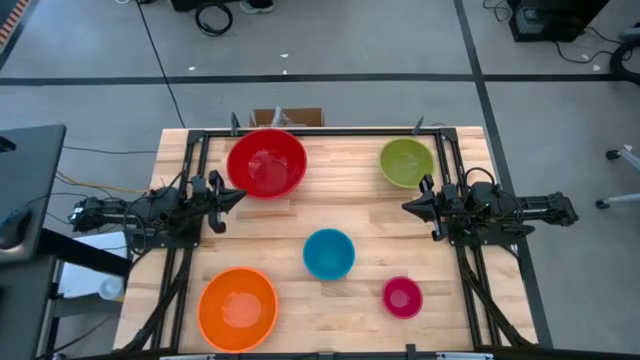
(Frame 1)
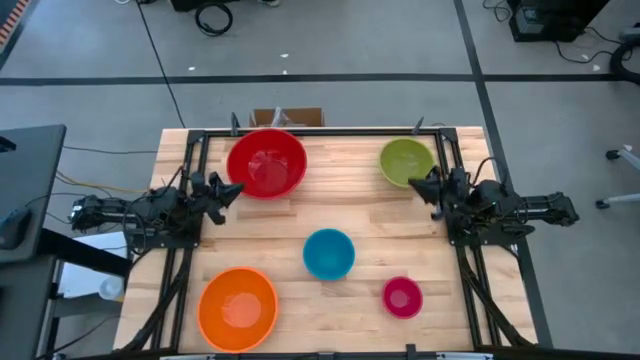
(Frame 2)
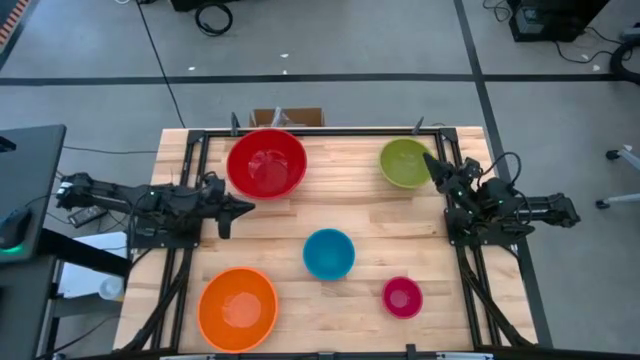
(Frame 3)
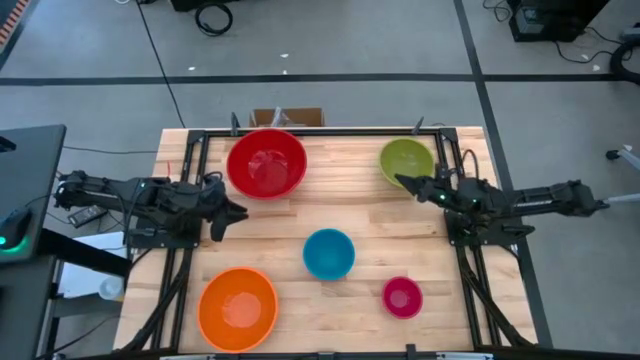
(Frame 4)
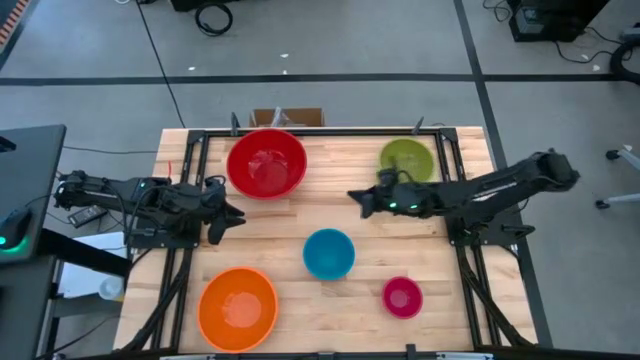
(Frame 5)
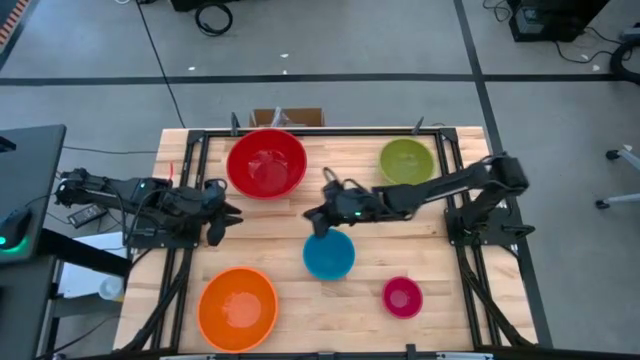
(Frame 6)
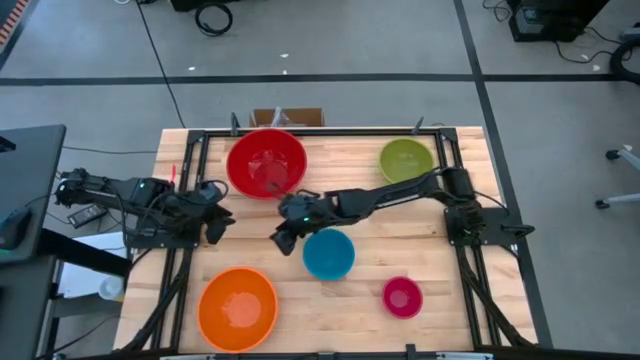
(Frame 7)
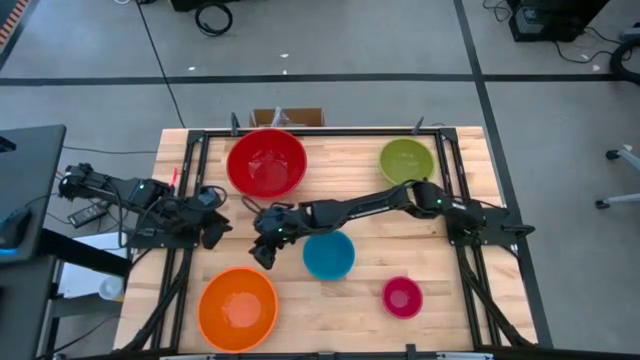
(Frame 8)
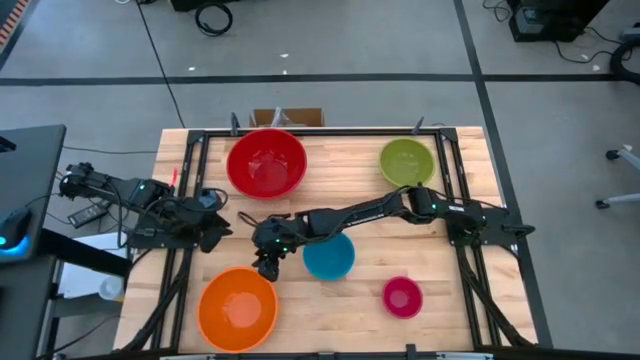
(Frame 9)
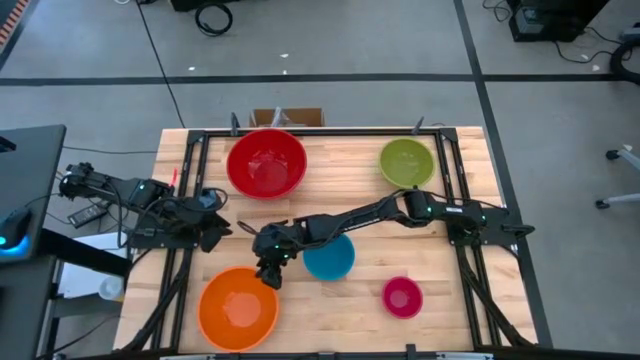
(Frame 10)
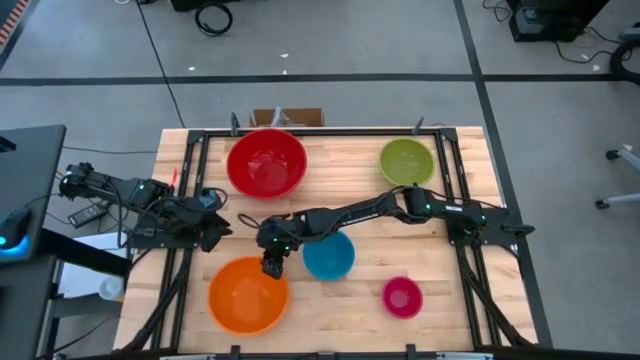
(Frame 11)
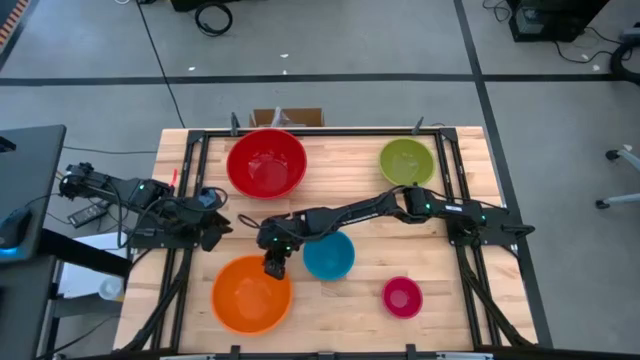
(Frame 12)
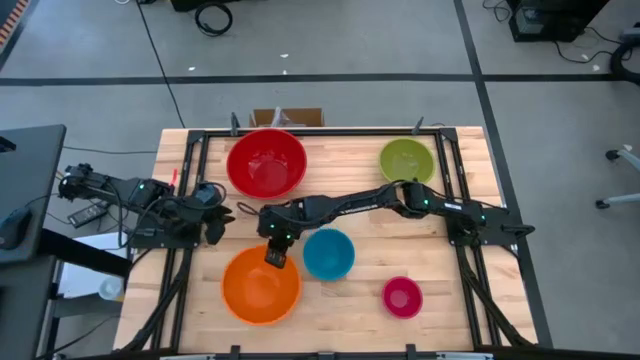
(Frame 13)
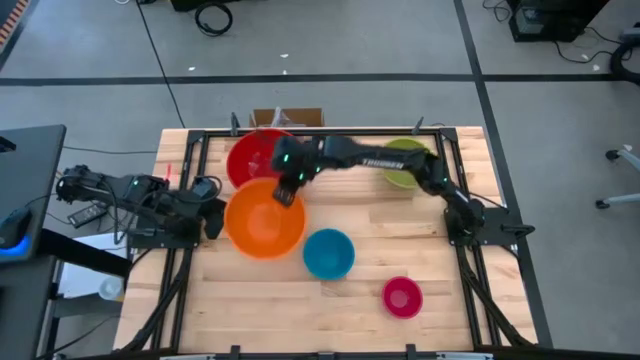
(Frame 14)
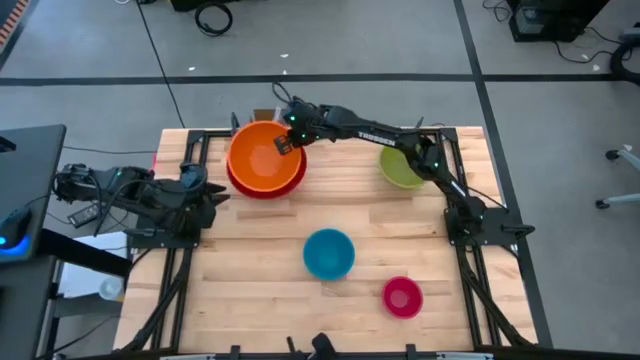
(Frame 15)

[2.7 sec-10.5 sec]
Stack the orange bowl on top of the red bowl

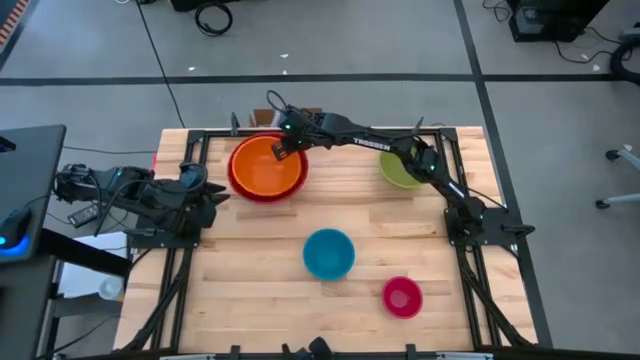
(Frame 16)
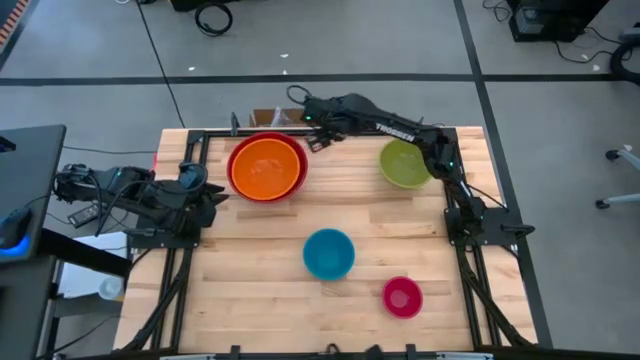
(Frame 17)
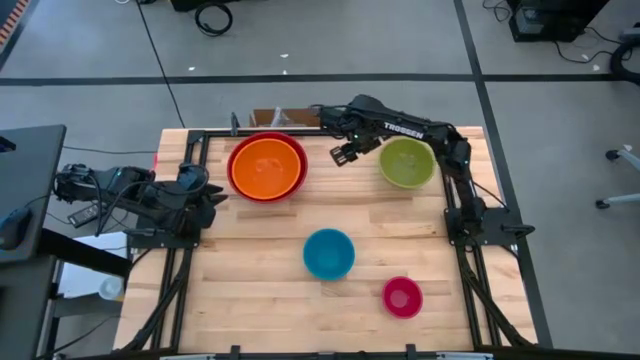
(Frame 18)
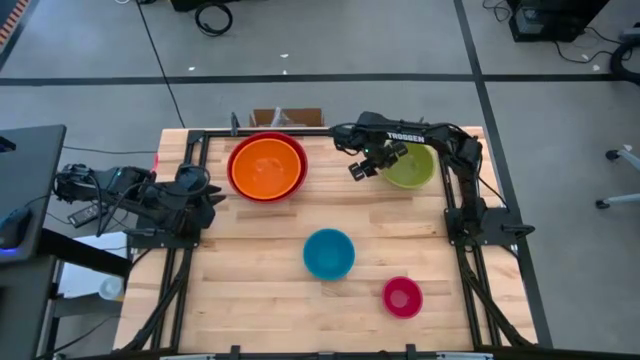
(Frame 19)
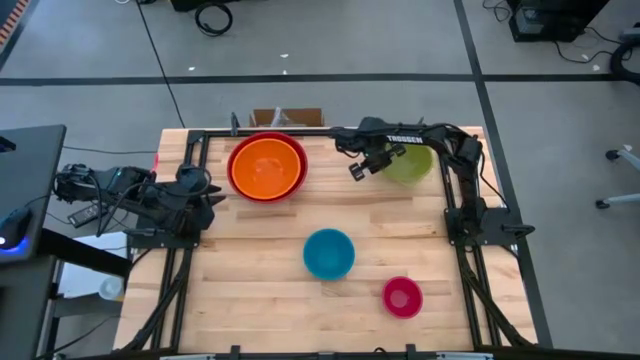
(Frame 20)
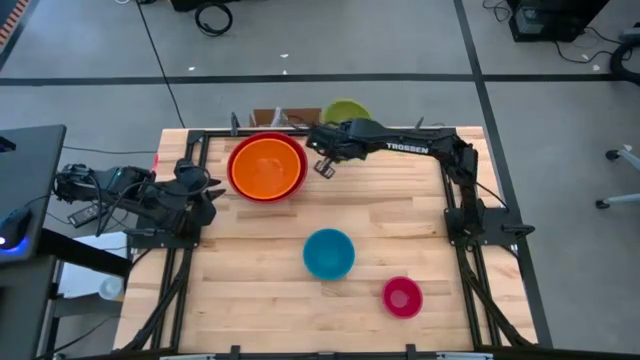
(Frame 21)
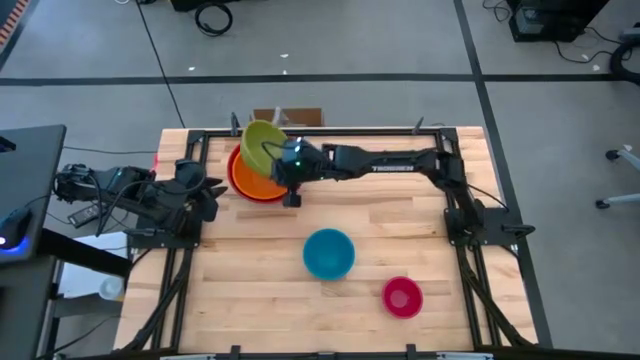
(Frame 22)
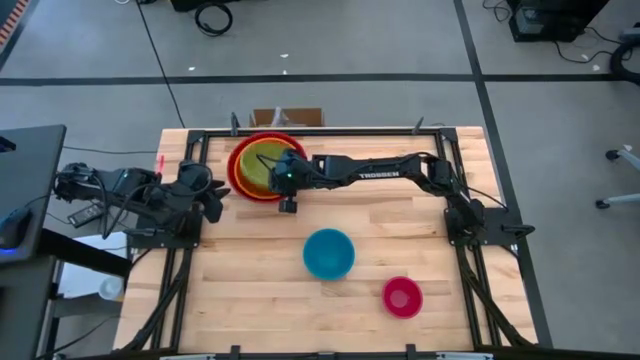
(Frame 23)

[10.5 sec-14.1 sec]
Stack the green bowl on top of the orange bowl

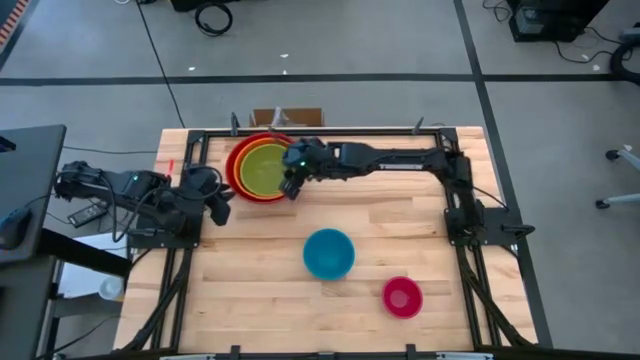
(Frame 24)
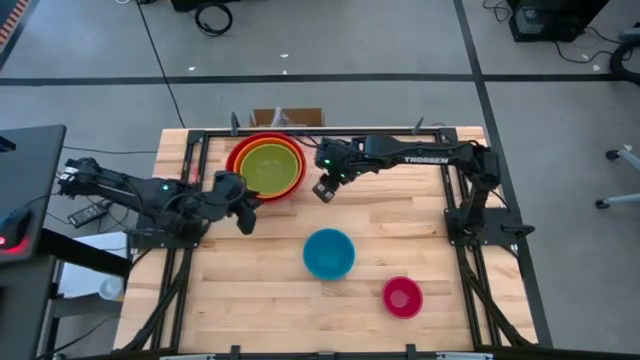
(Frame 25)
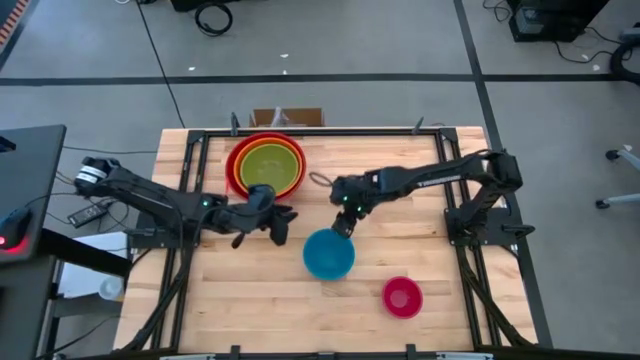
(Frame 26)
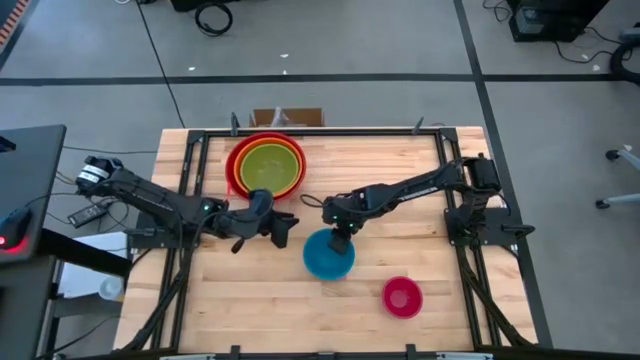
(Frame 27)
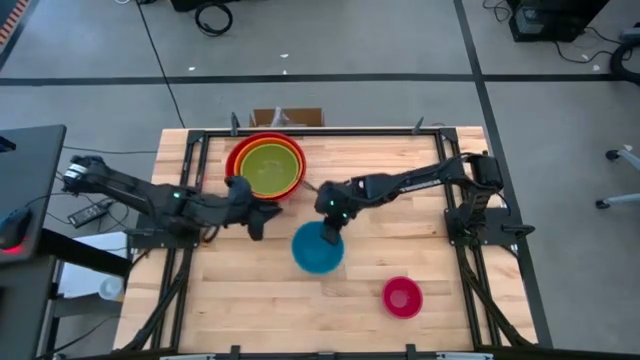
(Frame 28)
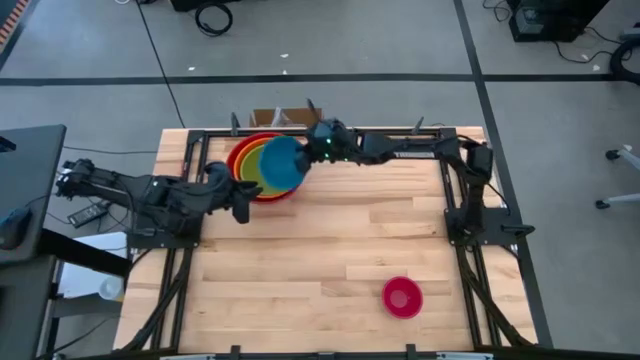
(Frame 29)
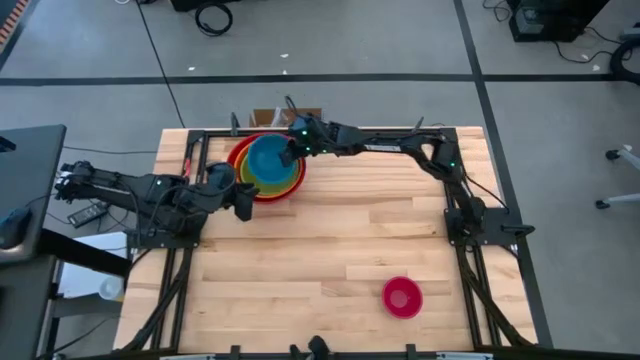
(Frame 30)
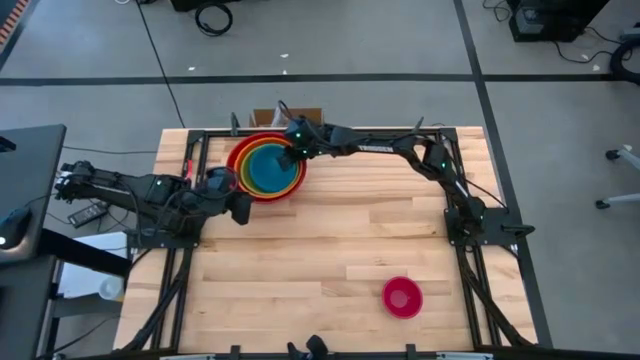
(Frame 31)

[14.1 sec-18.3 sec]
Stack the blue bowl on top of the green bowl

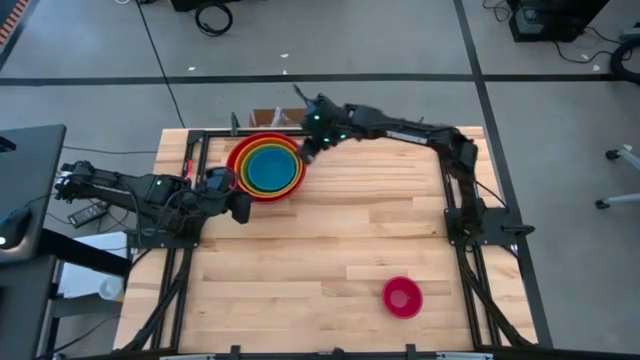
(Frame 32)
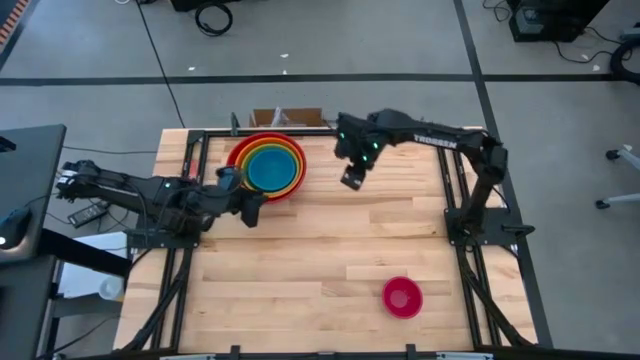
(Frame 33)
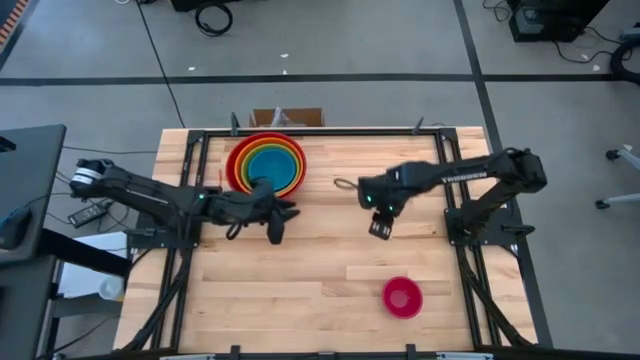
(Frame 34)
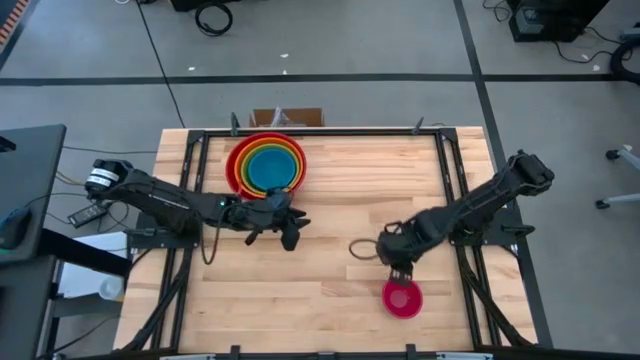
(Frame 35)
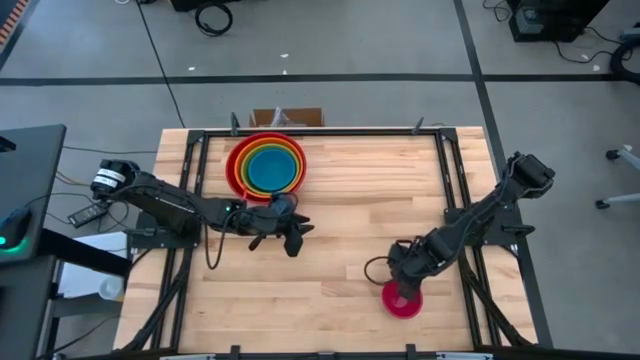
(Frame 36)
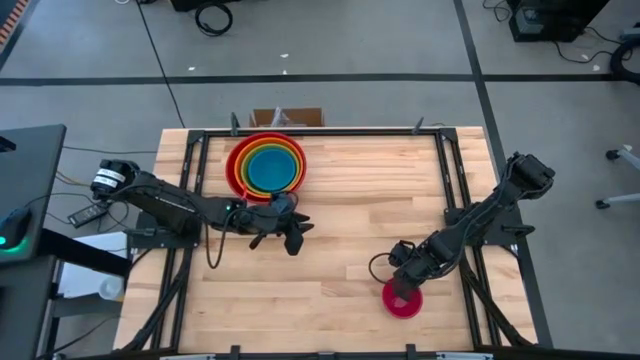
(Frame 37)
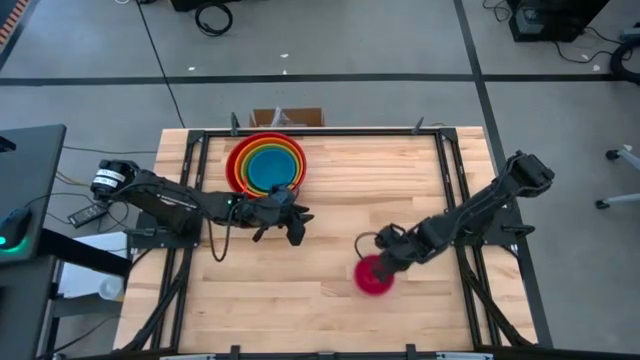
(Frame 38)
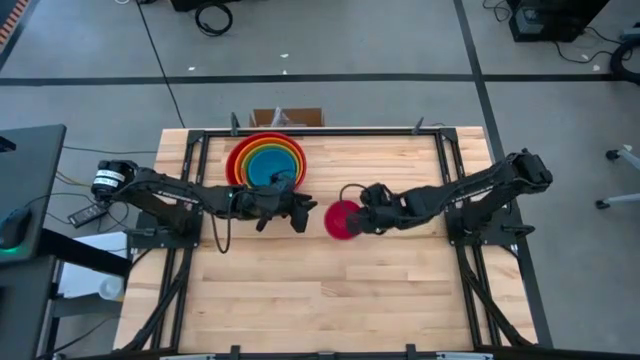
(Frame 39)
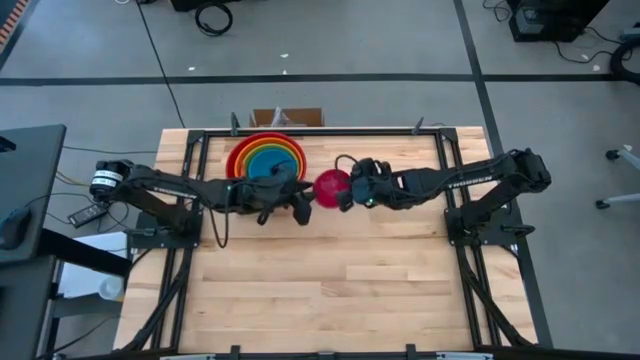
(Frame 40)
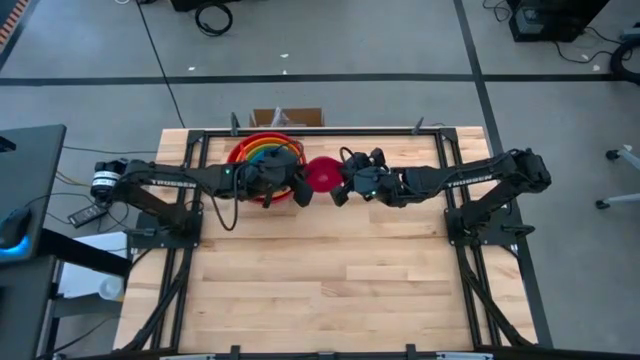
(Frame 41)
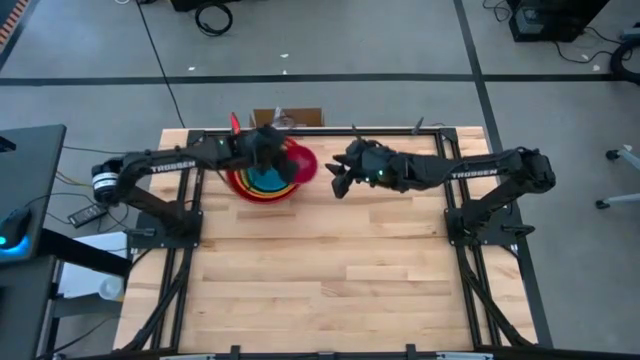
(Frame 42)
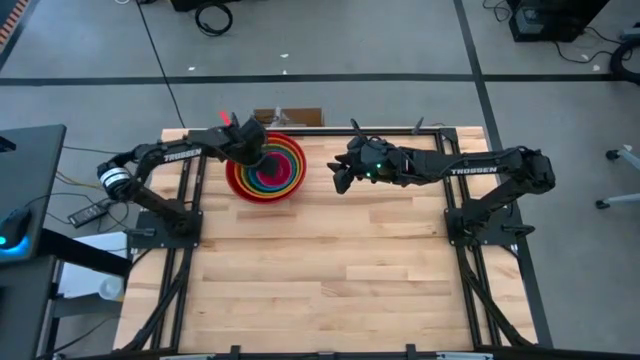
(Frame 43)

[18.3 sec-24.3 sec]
Stack the pink bowl on top of the blue bowl
